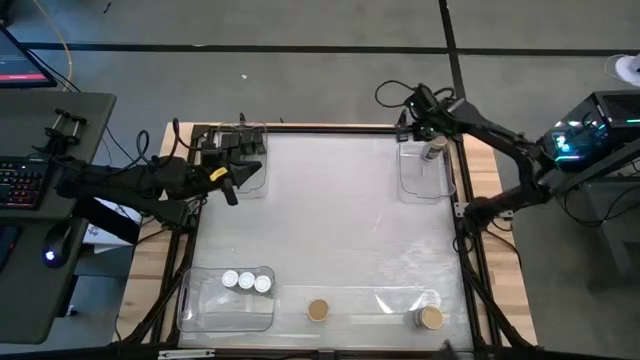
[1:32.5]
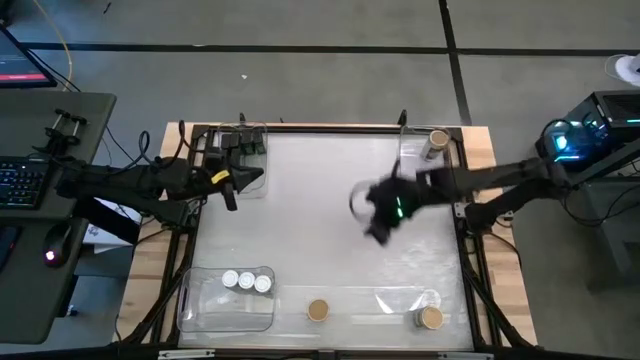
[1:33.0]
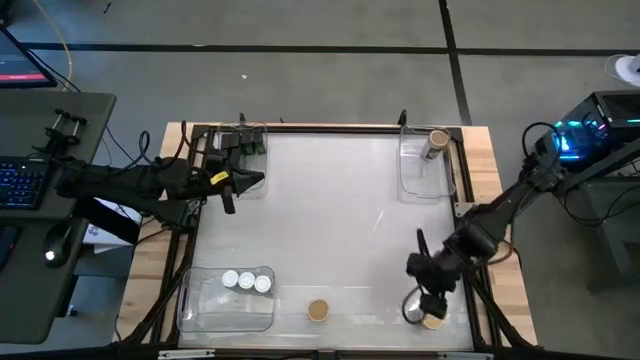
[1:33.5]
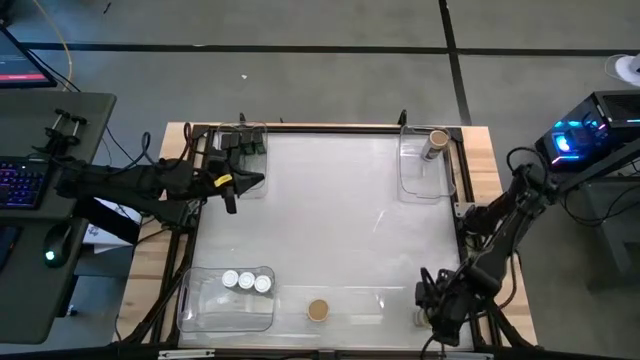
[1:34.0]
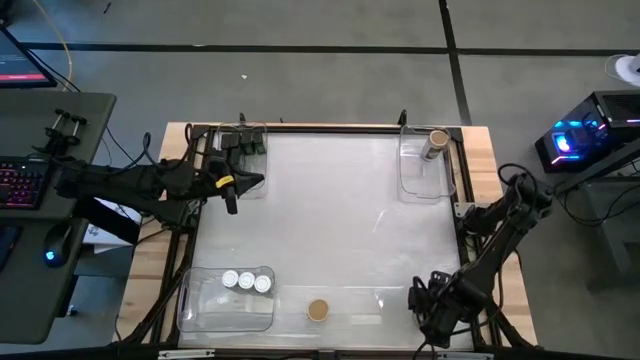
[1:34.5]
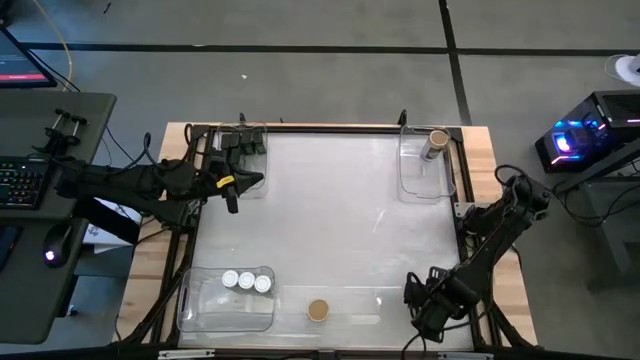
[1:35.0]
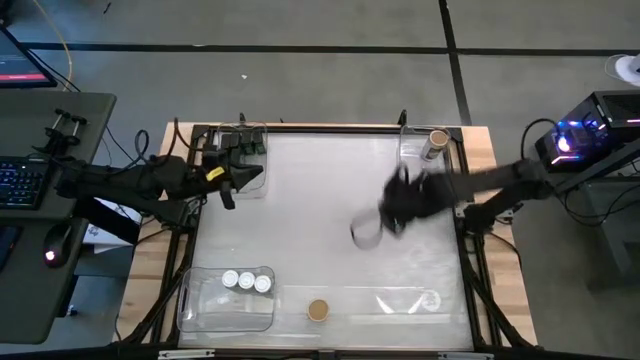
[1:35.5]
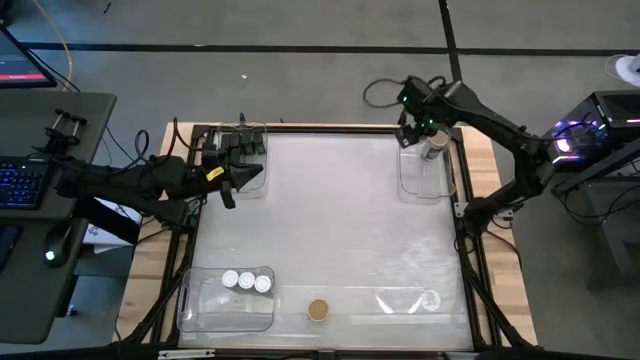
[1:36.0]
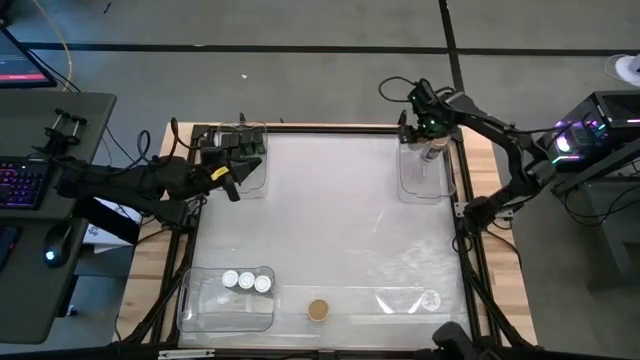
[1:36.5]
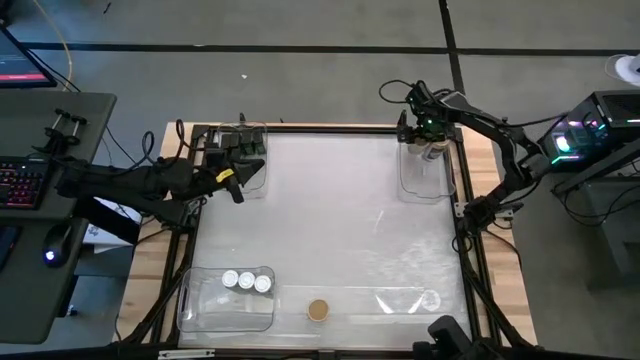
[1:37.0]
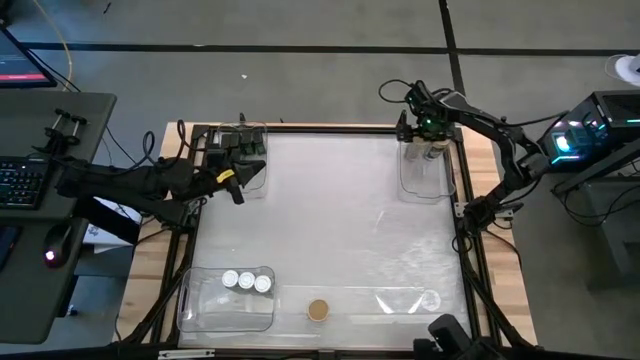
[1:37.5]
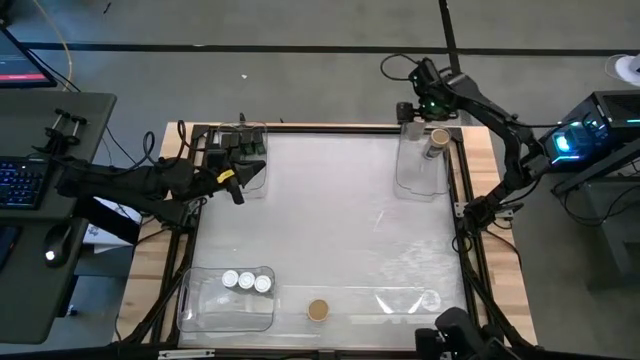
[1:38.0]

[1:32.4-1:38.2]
Task: Sort spices by type
Put the bottom right golden seasoning bottle into the top right transparent bin

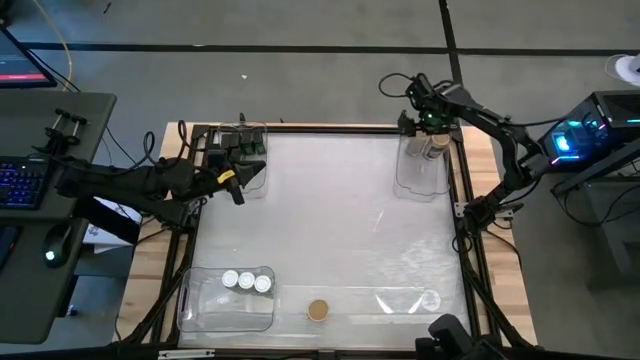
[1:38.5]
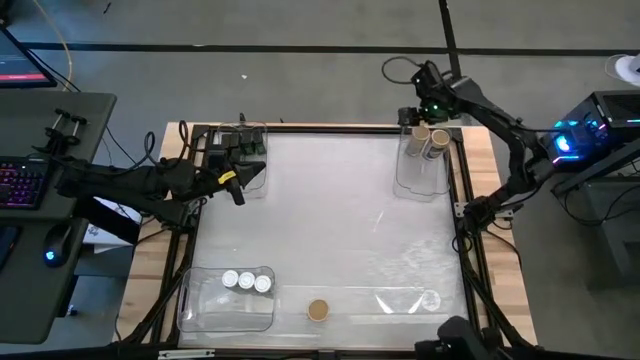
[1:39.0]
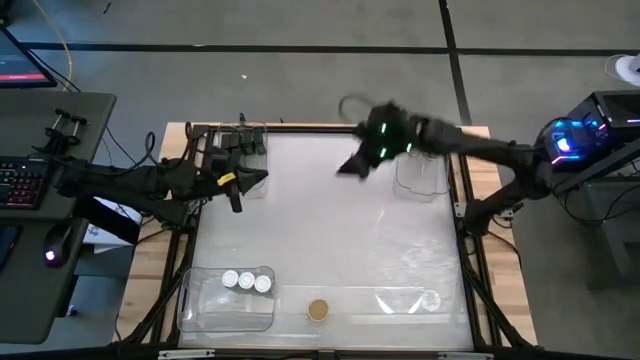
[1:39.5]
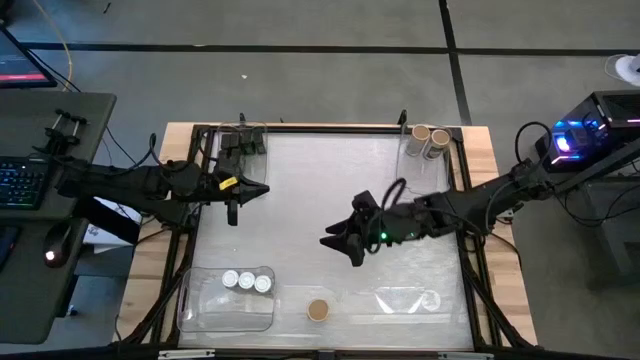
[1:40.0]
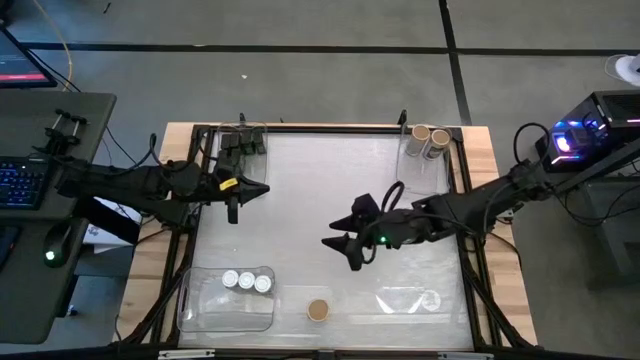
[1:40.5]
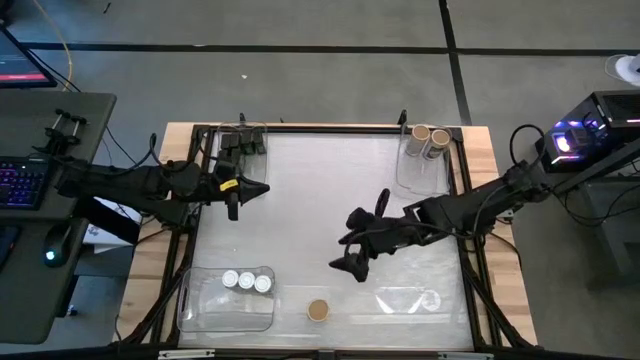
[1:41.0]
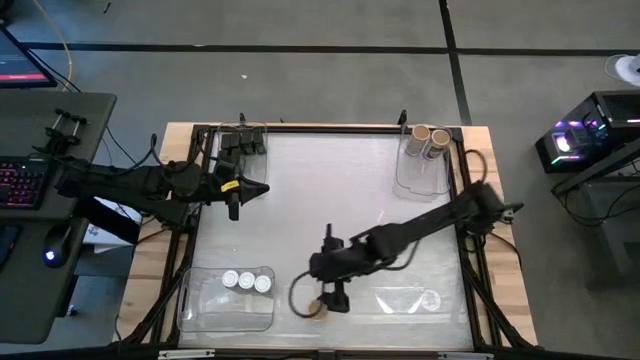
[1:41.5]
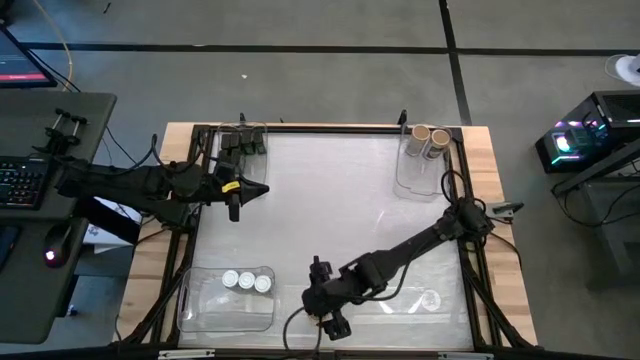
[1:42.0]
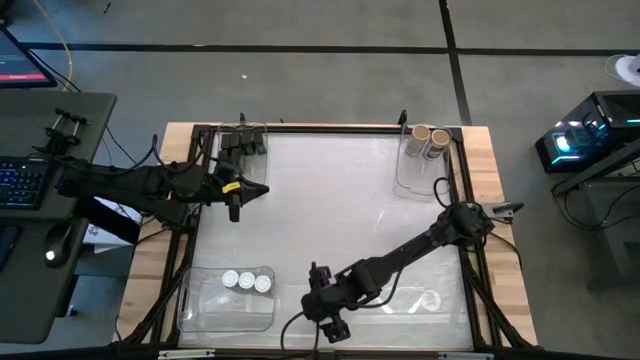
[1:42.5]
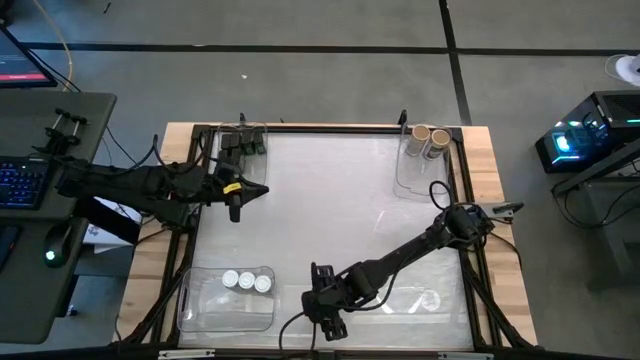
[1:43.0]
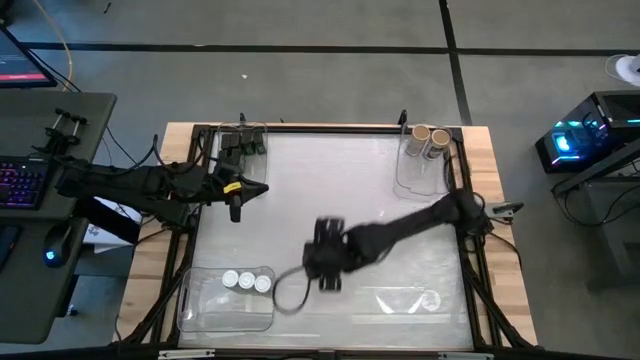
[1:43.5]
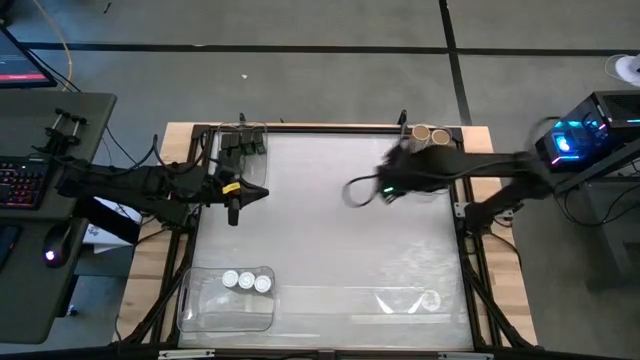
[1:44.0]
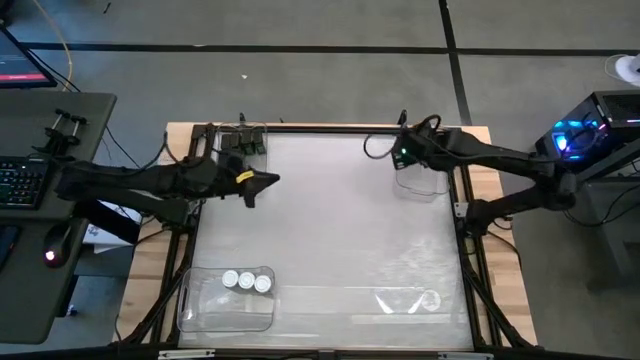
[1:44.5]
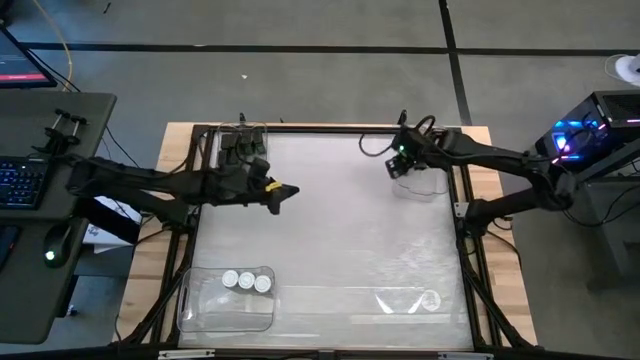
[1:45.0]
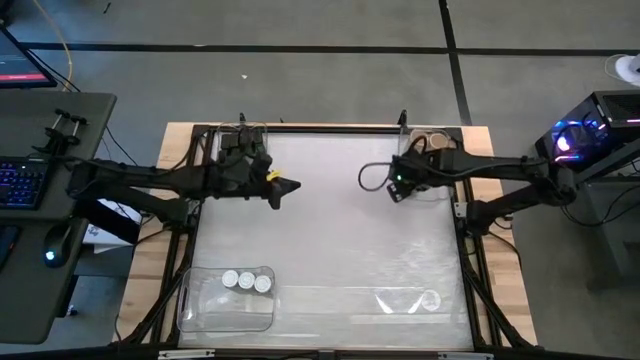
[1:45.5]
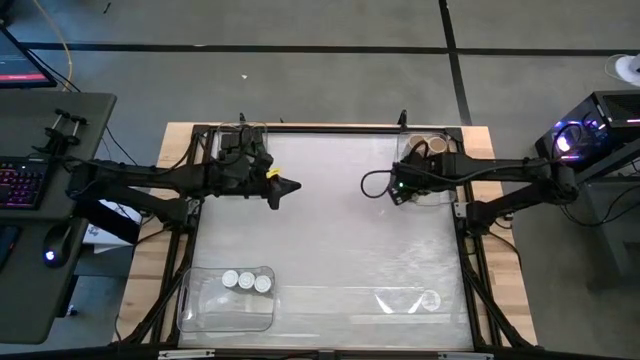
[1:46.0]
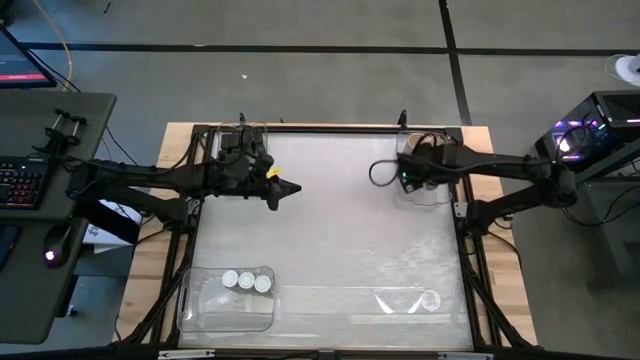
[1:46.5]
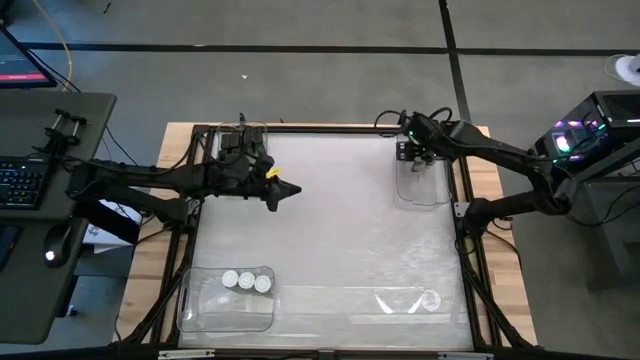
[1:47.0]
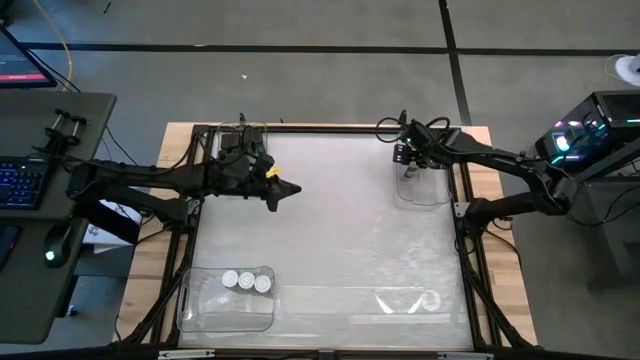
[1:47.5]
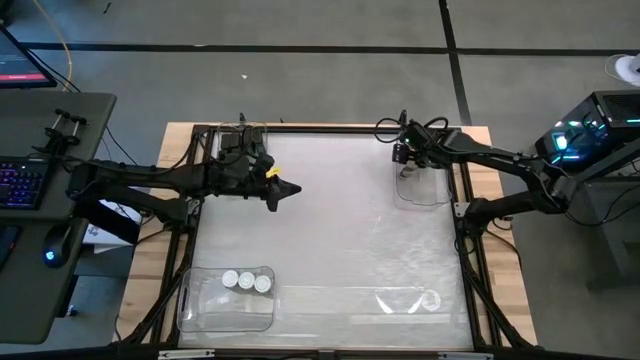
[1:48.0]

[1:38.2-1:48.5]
Put the golden seasoning bottle into the top right transparent bin

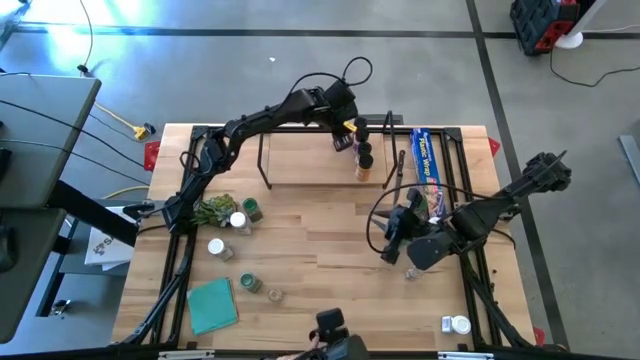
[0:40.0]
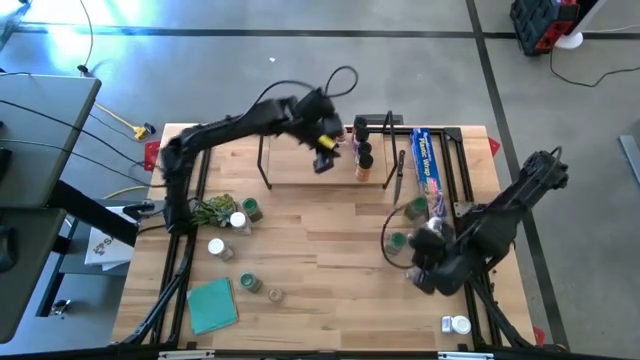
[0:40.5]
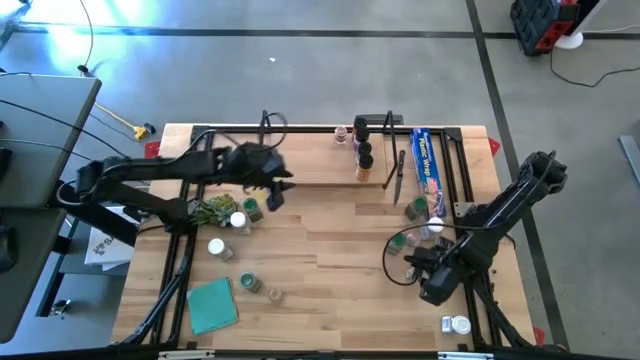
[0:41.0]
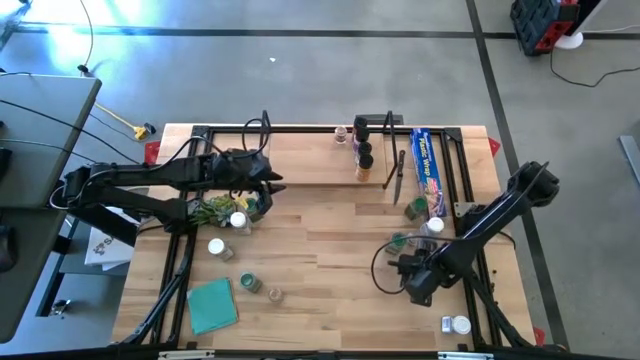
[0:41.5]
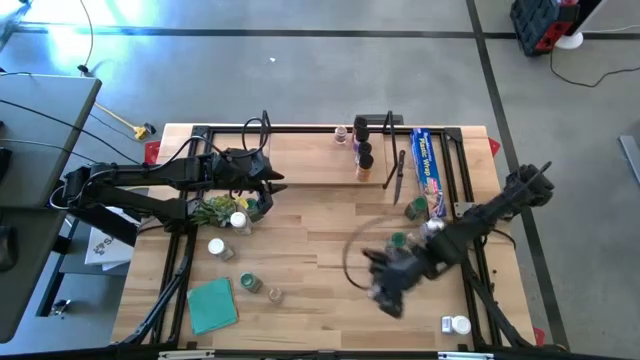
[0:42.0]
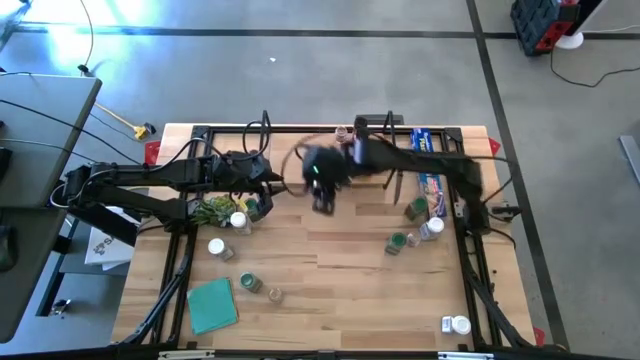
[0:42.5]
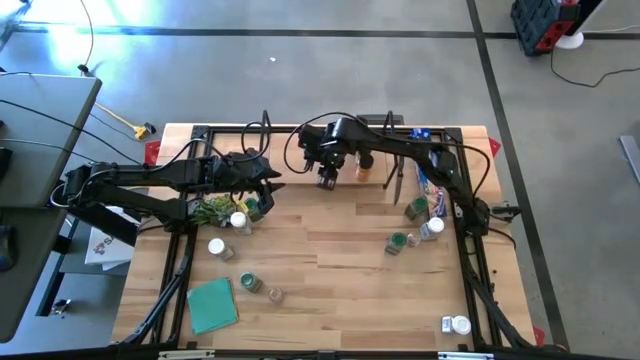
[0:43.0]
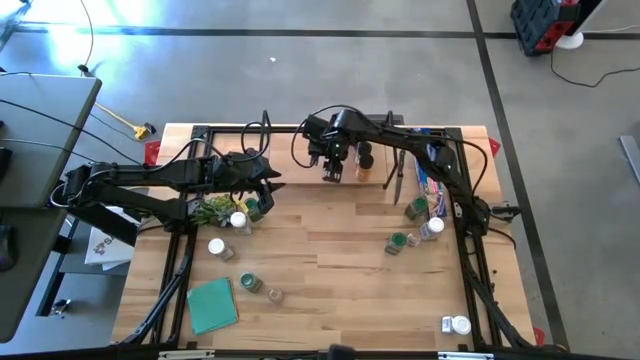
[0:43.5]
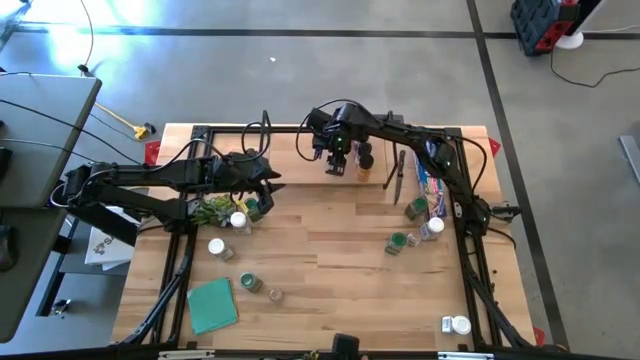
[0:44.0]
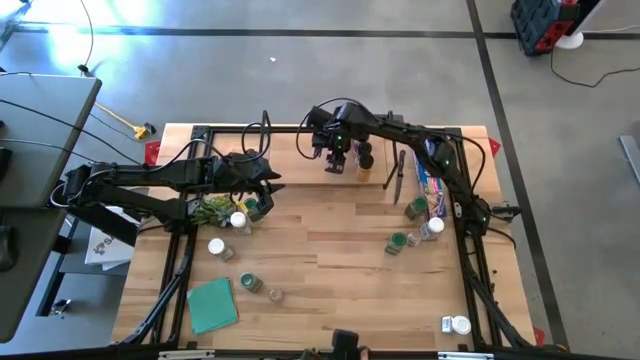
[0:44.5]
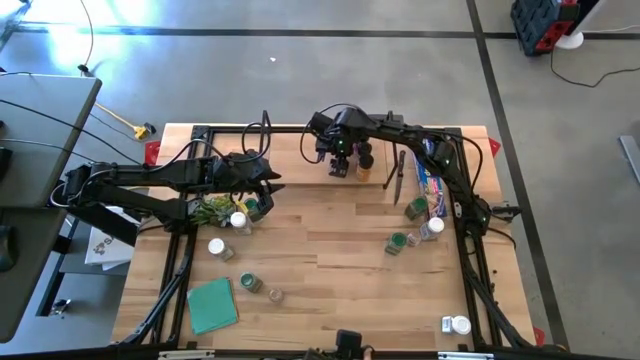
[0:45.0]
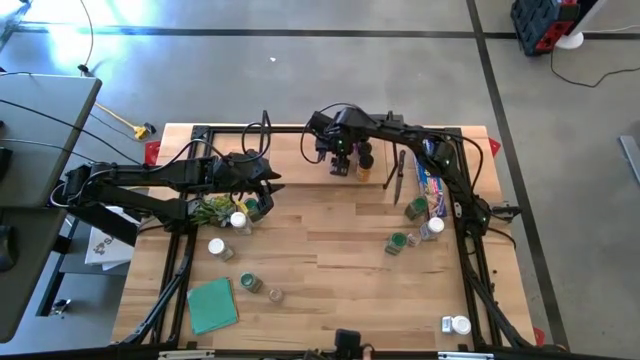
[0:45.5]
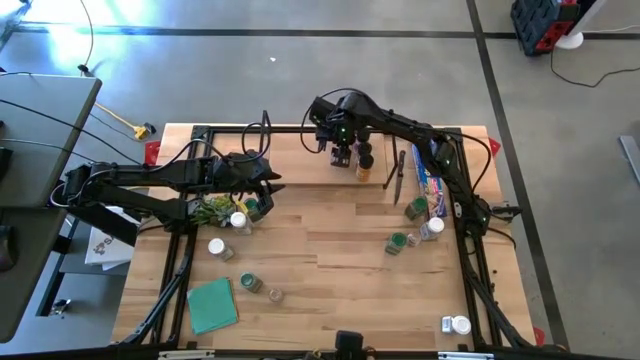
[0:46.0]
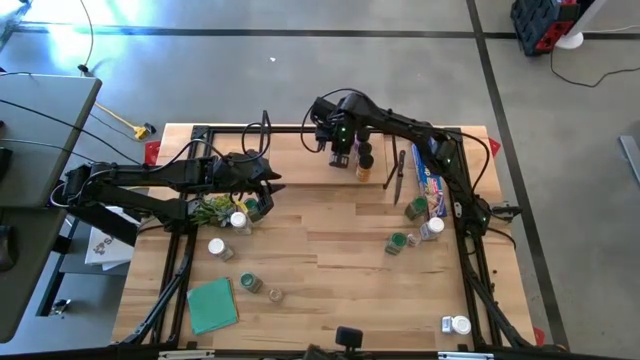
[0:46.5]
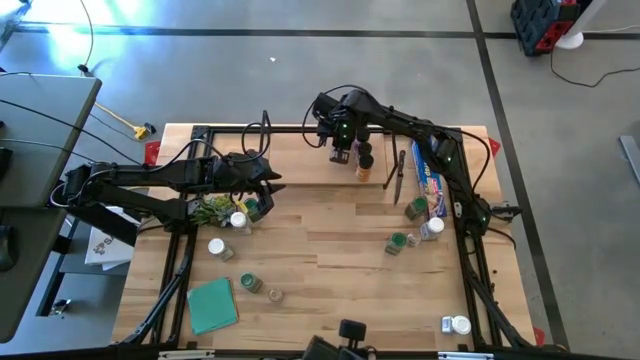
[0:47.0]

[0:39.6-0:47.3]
Task: Shelf spices
Put the brown seasoning bottle on the shelf align with the other brown seasoning bottle
